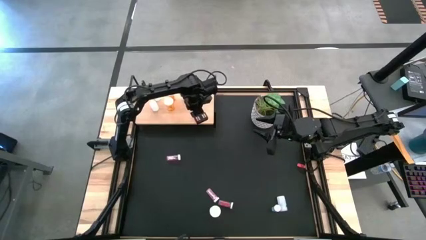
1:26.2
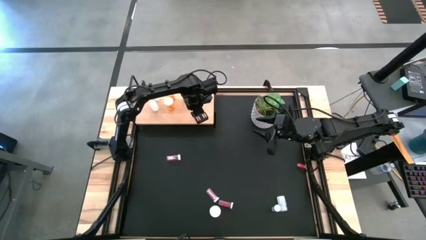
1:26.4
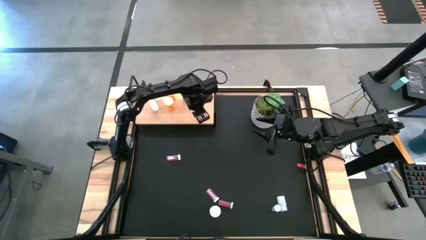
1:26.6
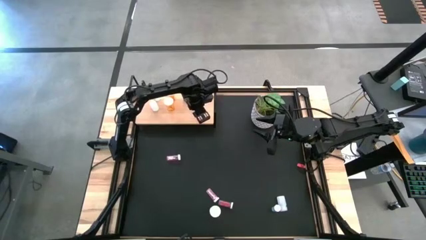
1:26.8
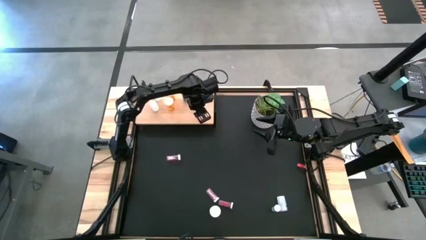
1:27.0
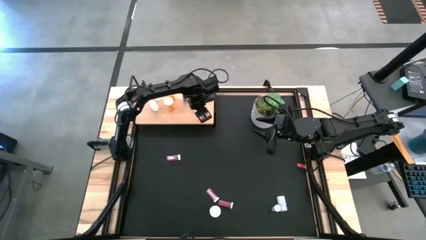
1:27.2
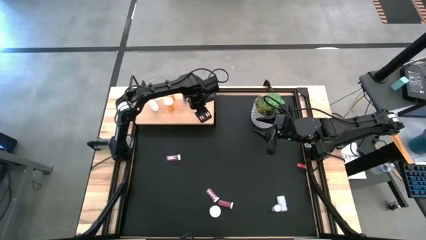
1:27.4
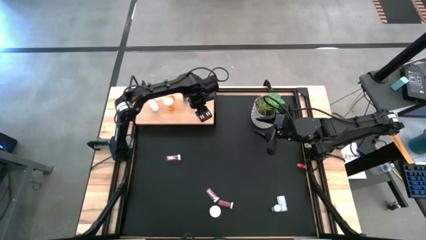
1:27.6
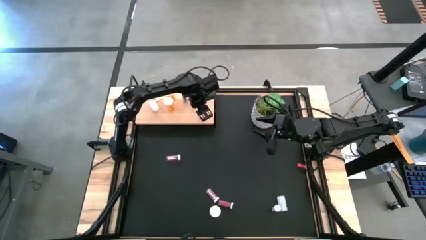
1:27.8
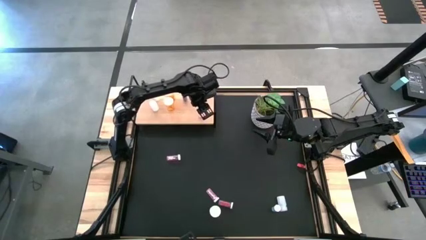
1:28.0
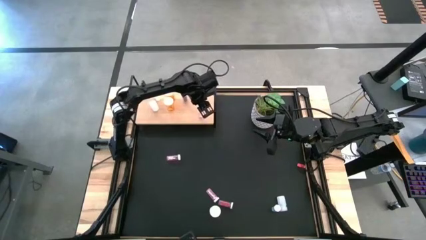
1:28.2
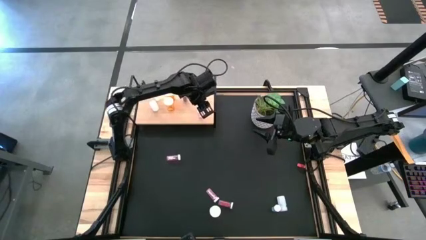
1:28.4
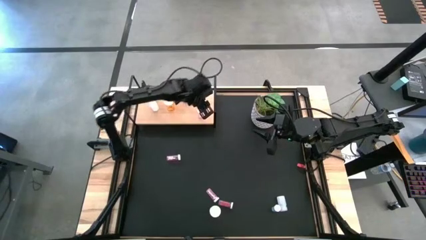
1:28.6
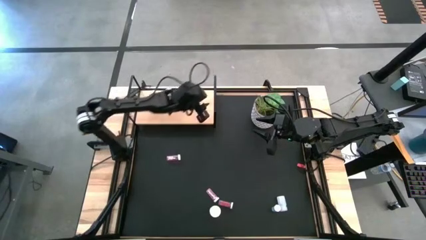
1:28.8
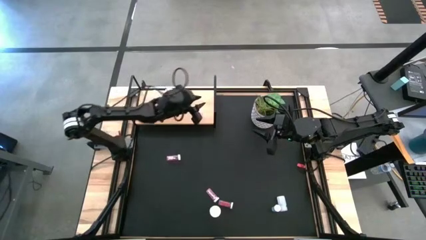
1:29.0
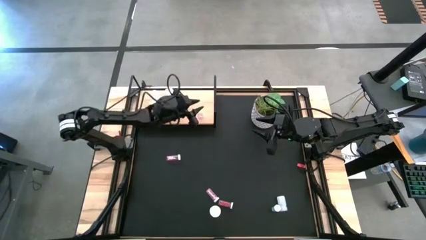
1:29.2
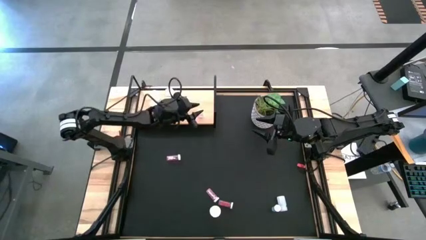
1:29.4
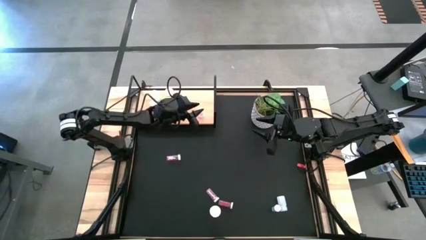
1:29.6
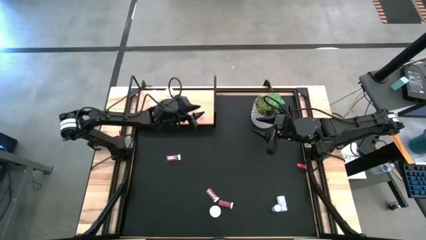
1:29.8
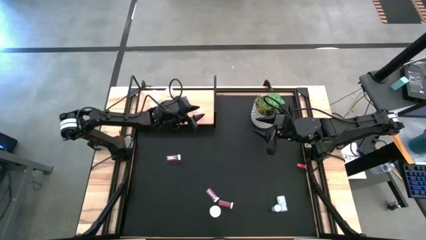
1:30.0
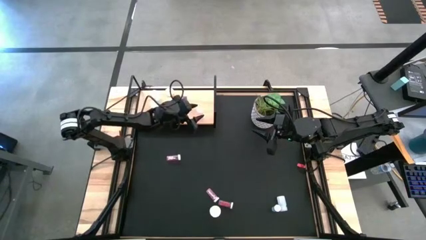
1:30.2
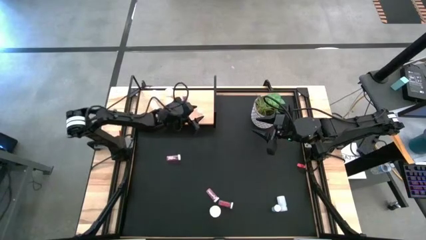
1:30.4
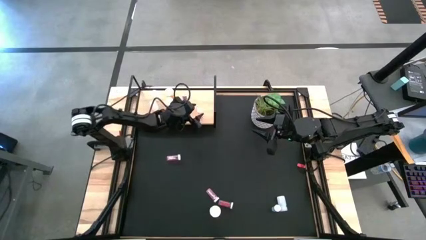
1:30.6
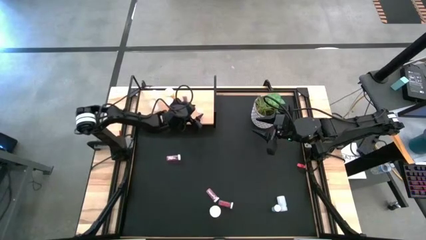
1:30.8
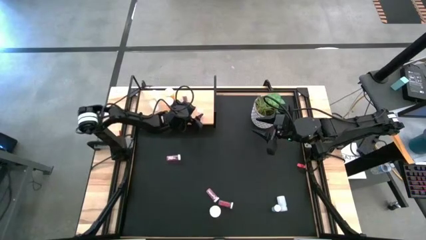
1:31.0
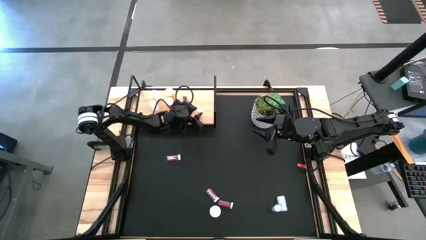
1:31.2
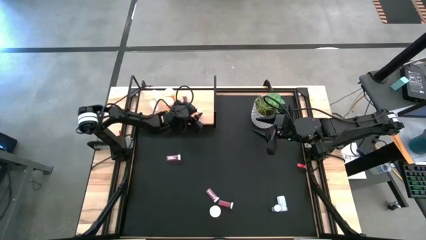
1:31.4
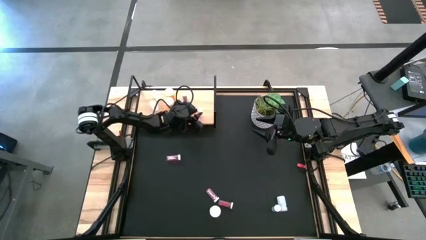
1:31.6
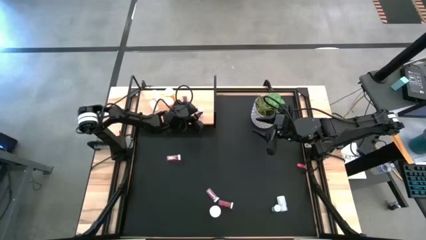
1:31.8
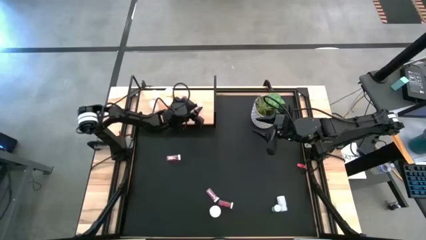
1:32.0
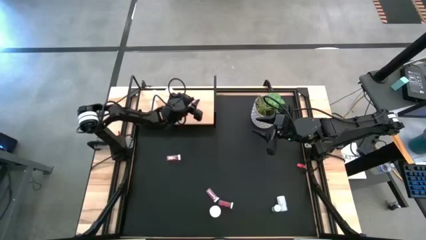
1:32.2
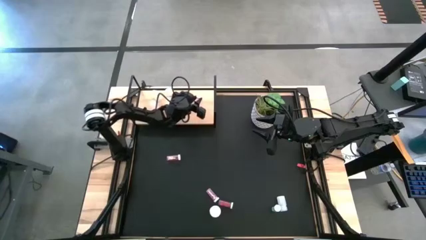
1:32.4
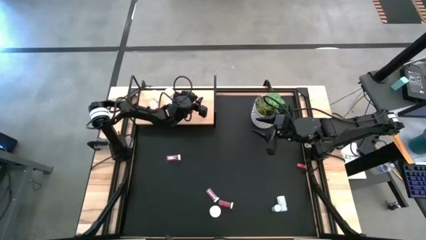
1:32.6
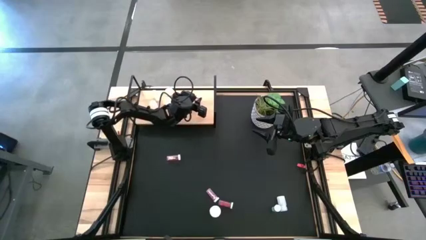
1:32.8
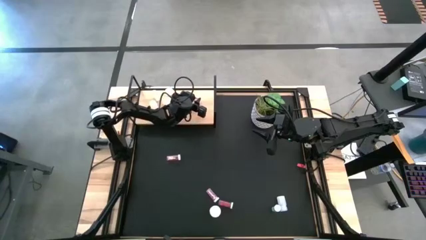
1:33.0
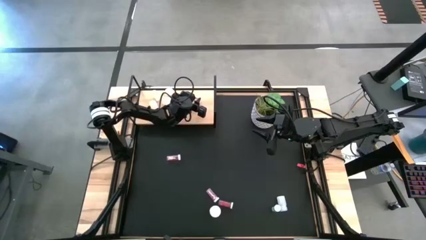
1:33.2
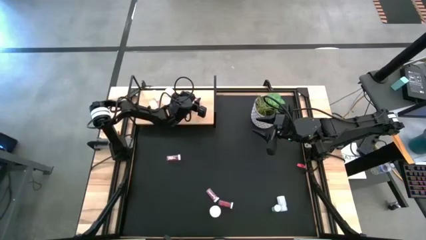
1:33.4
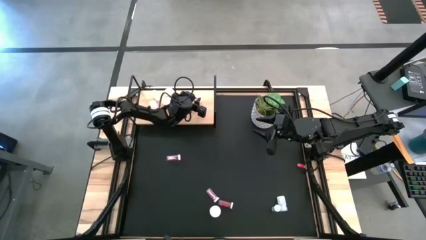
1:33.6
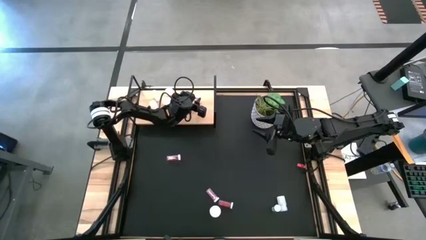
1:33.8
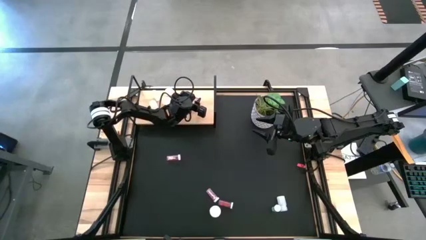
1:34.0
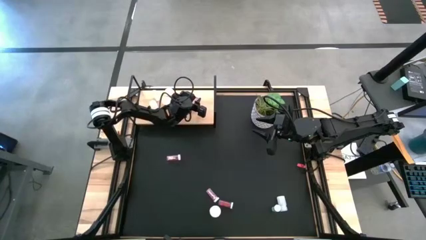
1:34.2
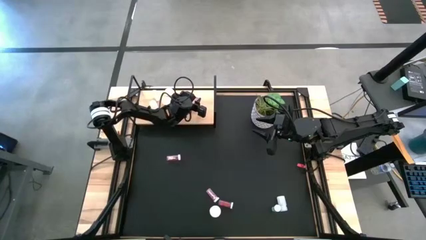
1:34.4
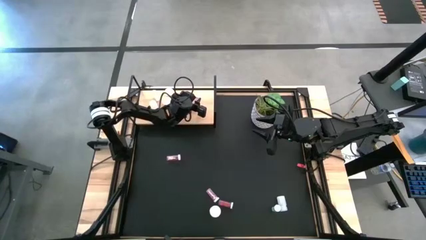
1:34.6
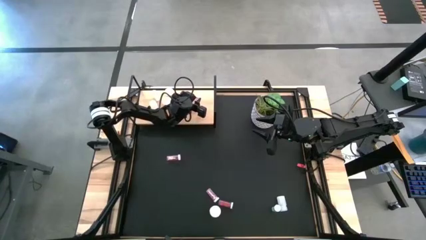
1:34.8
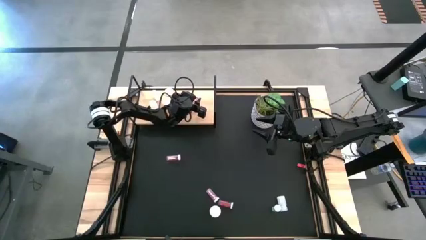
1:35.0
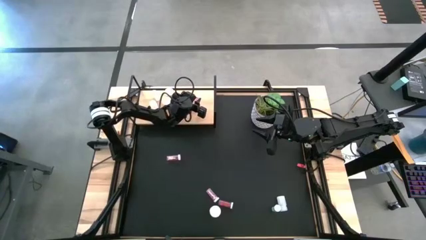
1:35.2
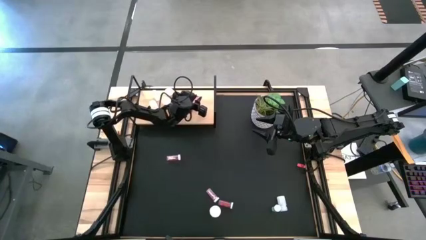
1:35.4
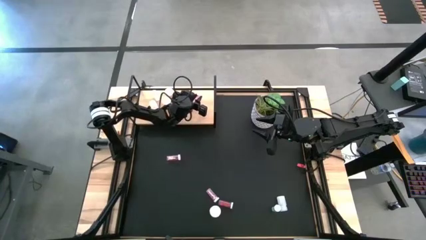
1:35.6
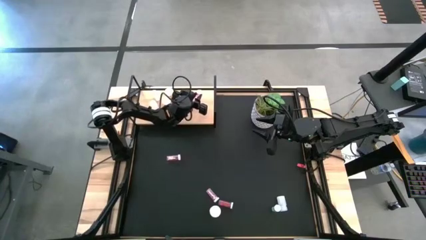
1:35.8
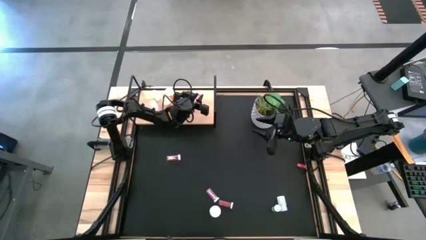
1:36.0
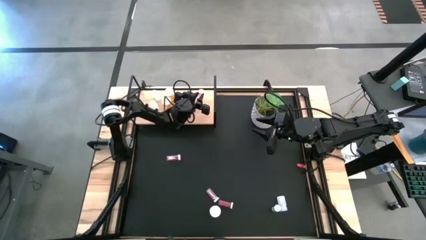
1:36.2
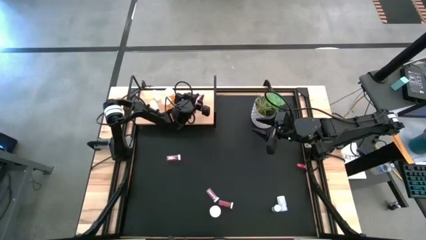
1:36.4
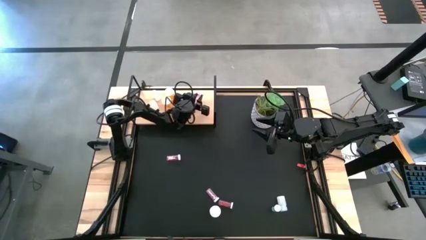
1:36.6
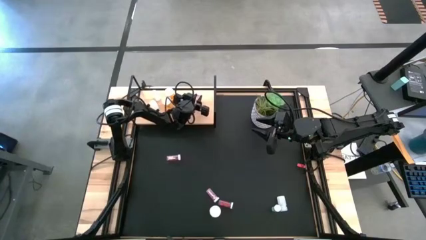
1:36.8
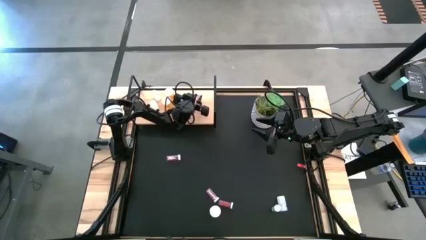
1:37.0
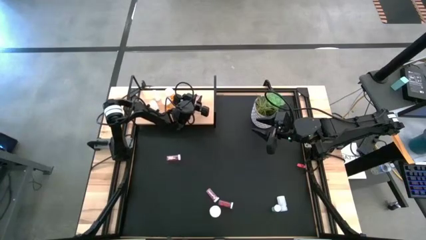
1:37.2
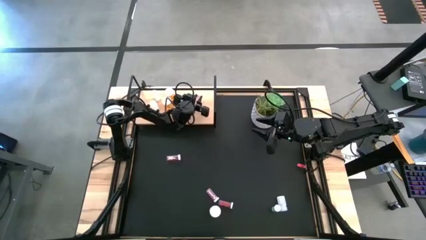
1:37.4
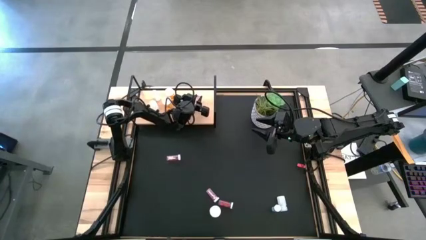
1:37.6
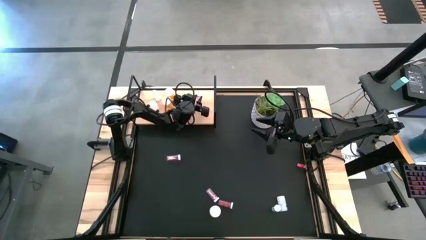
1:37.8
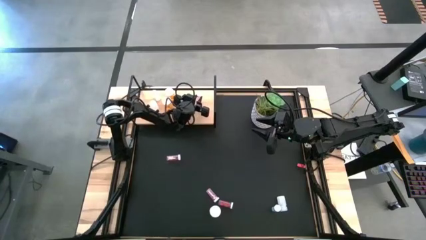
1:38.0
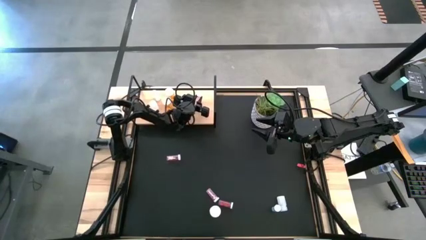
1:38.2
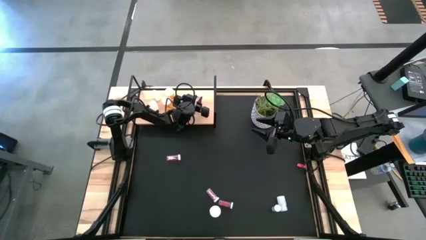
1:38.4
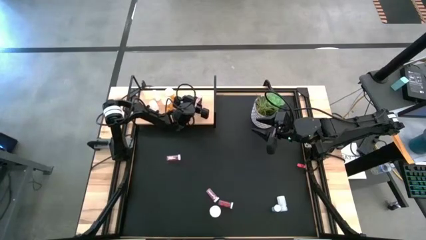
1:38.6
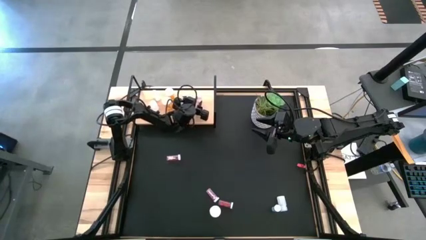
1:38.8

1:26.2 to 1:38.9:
Task: Pick and place medicine bottles onto shelf by color
Put the top right pink pill bottle on the shelf

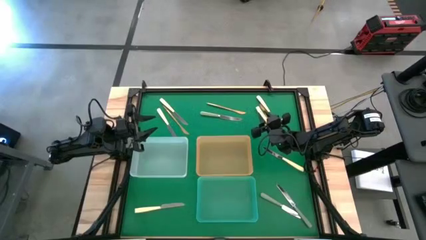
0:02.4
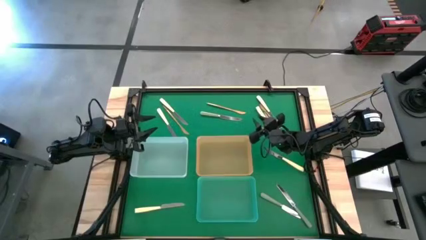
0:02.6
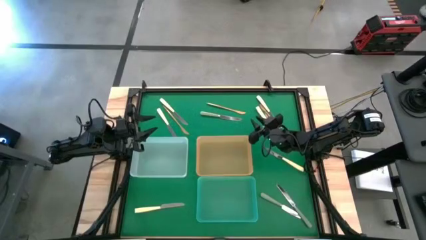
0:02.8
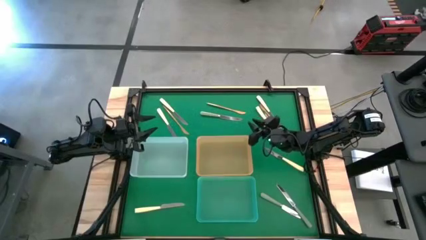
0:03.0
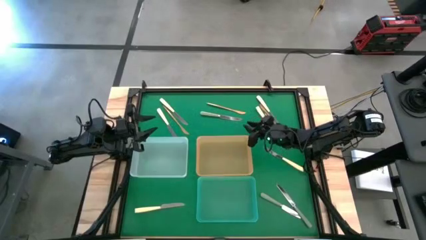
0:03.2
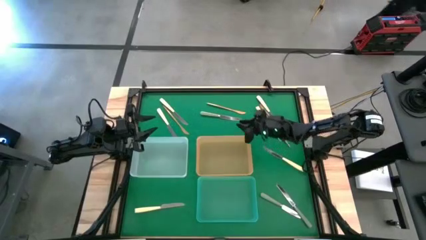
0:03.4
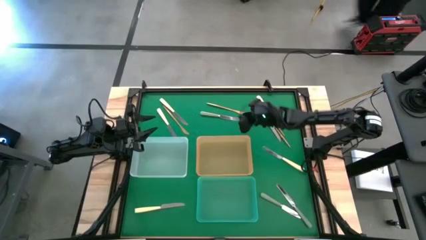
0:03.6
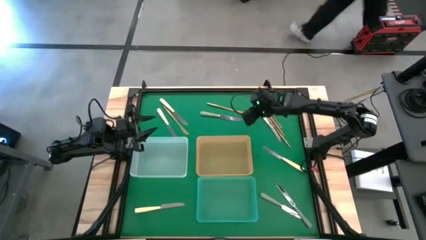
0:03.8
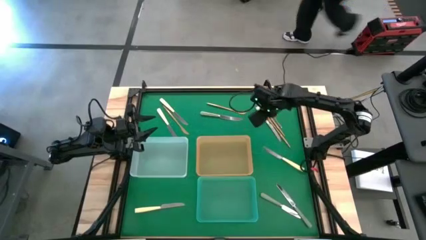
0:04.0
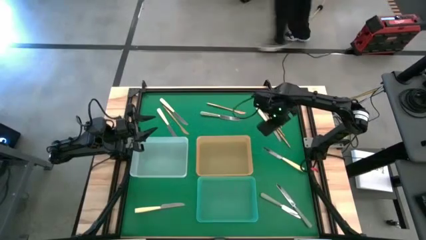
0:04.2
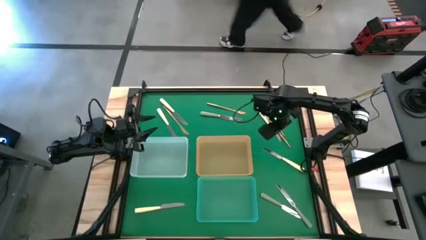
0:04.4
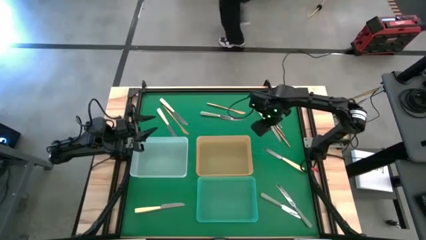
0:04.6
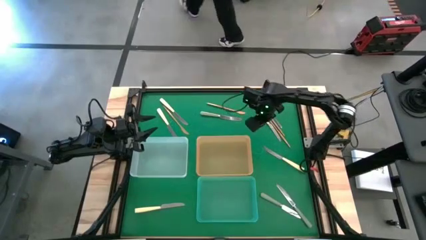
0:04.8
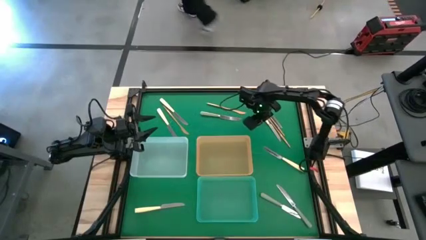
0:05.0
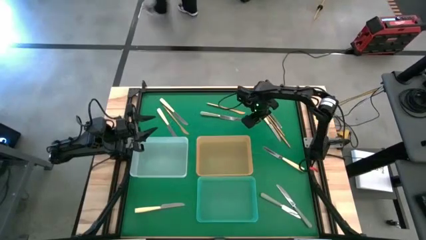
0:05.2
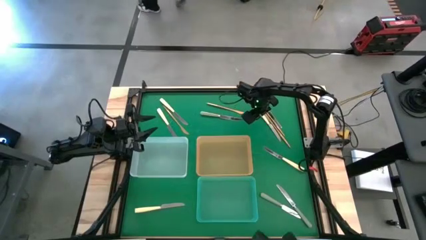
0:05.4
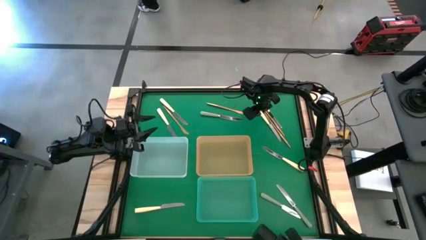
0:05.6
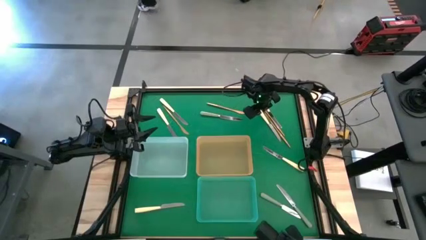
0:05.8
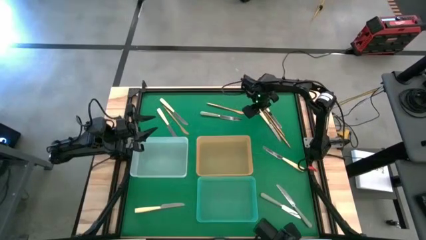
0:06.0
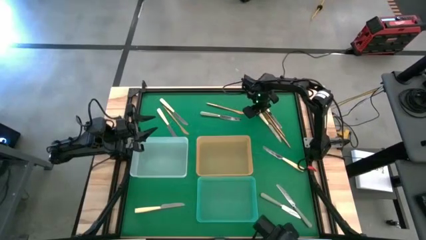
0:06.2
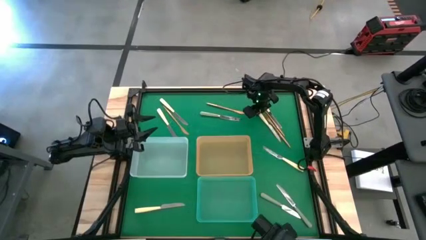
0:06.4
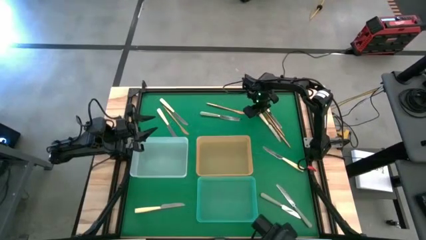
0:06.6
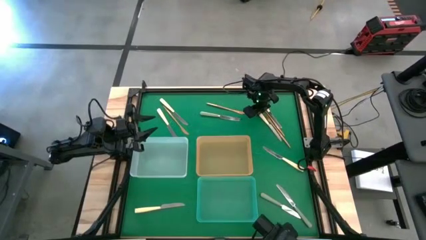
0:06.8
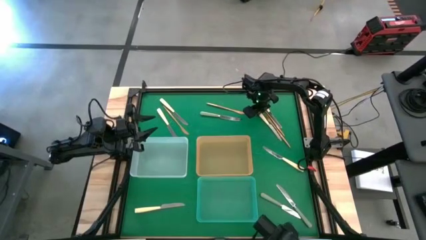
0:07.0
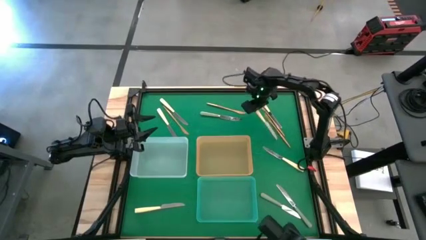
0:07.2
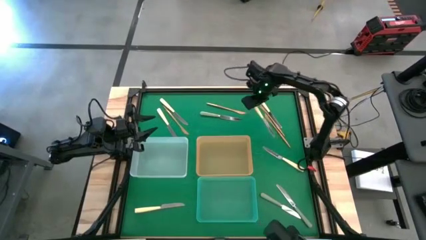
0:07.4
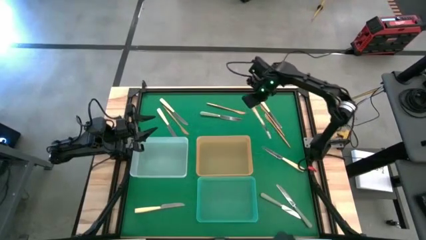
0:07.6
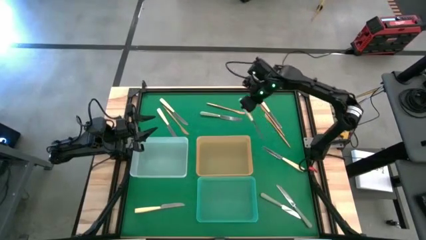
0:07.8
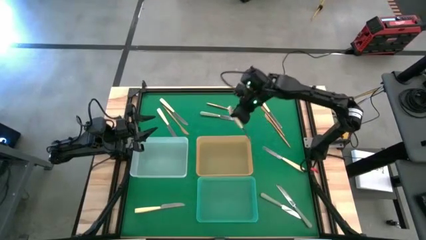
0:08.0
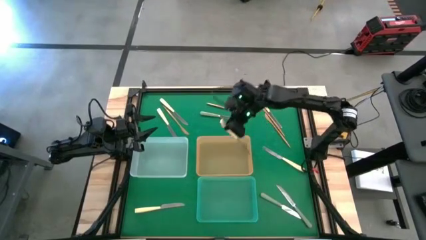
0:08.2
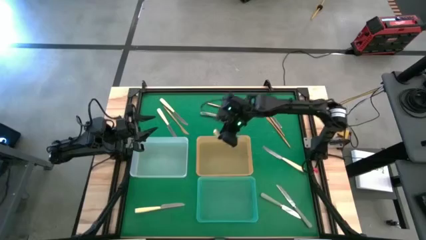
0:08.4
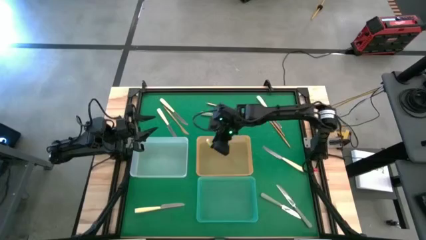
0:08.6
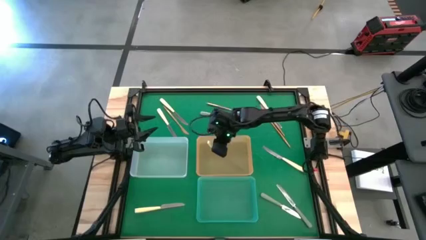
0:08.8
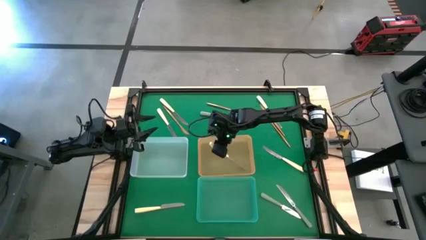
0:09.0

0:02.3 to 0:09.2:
Task: Sort silverware by color (type)
Put the yellow table knife into the orange bin
